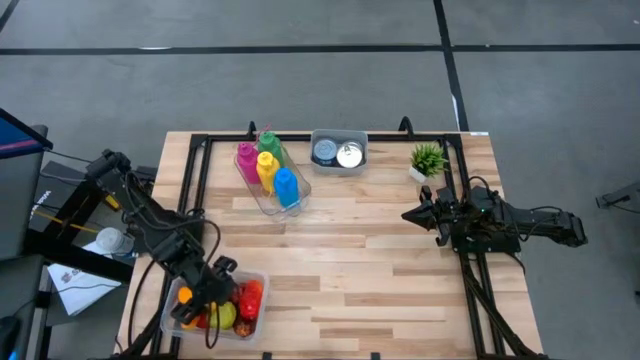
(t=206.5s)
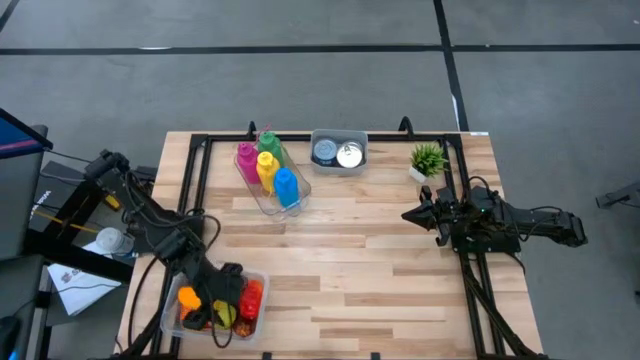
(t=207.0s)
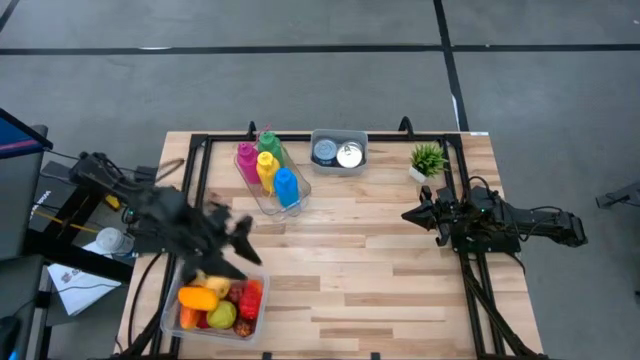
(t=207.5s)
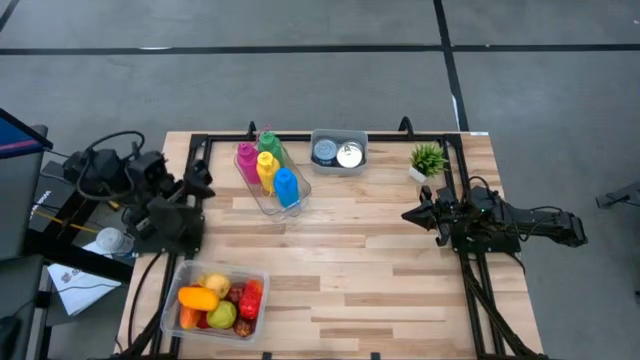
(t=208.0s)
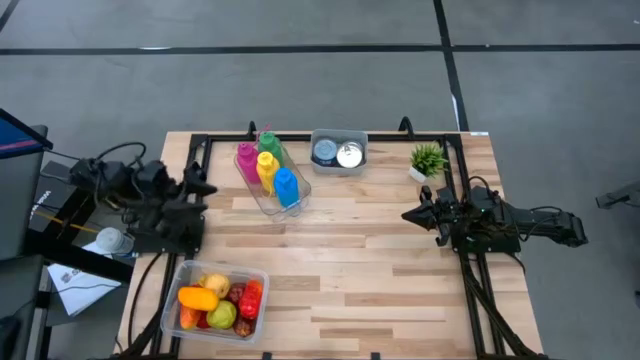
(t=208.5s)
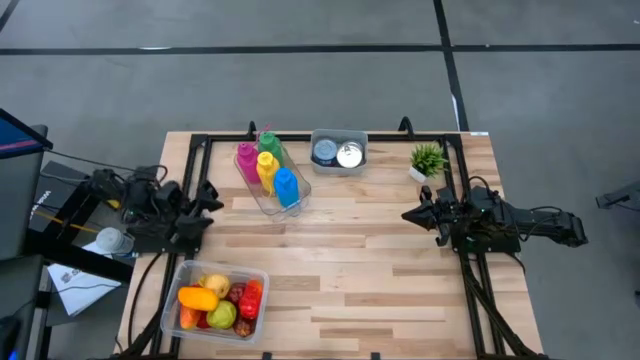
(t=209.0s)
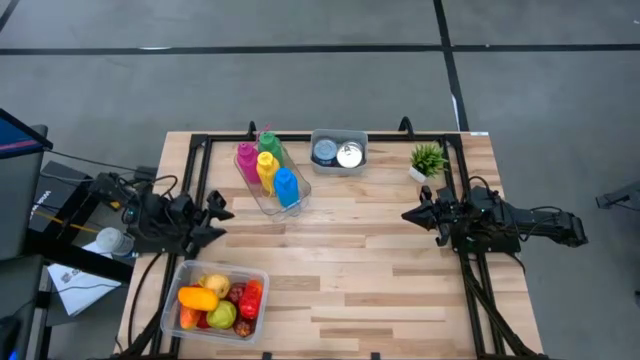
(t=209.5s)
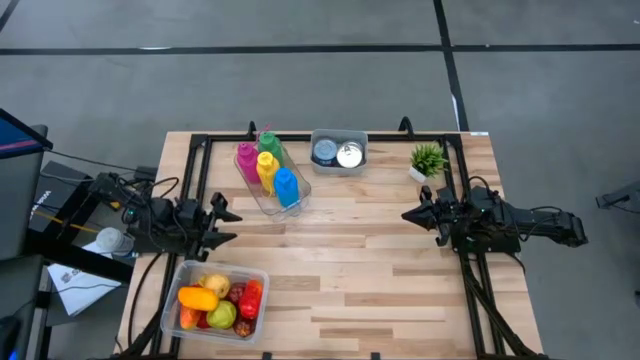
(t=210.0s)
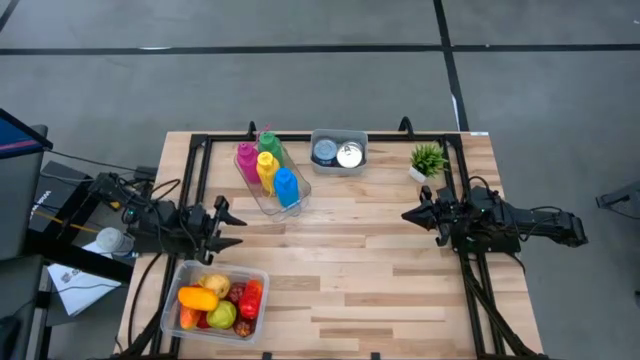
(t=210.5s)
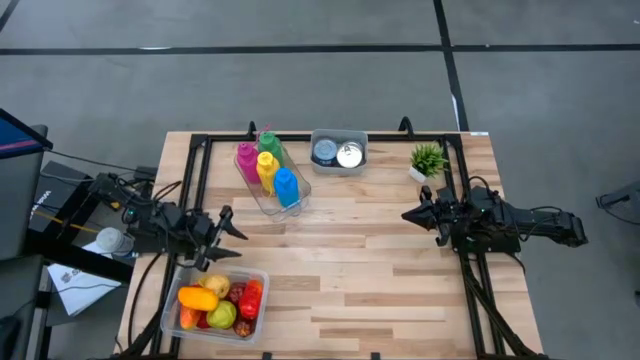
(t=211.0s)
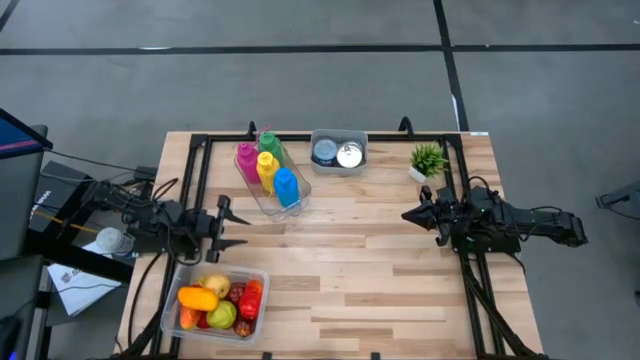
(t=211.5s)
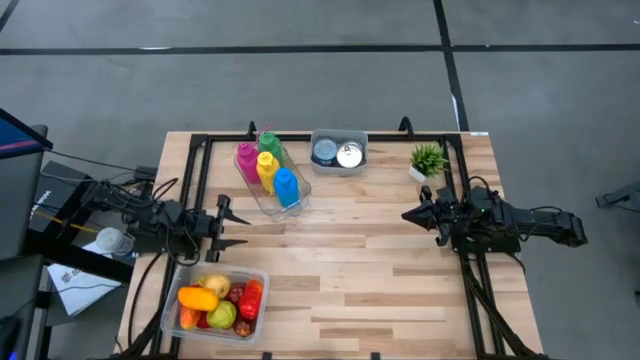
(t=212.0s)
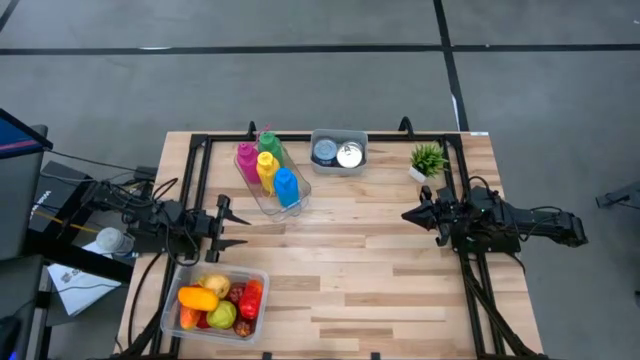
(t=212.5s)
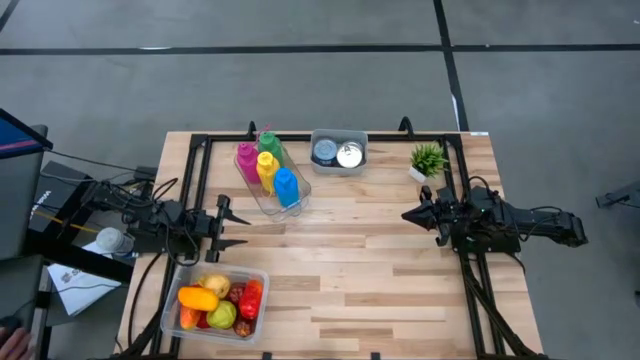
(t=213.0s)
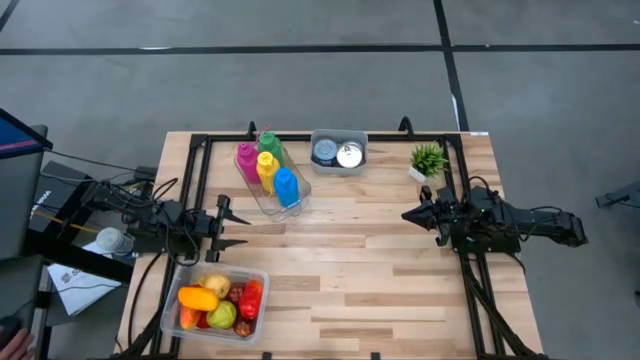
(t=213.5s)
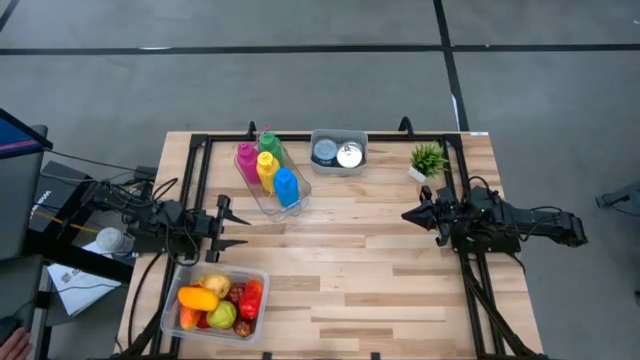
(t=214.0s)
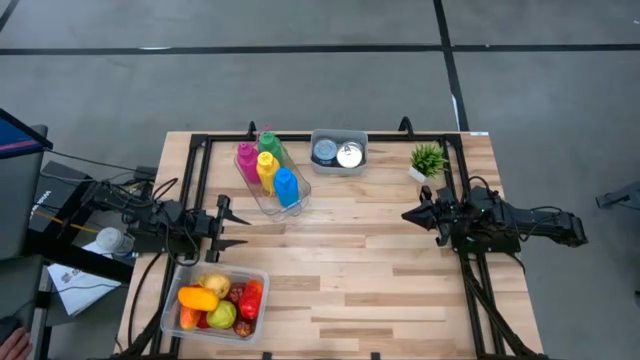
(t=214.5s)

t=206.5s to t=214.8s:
Task: Pick & Place Food Item
Return to Home Position

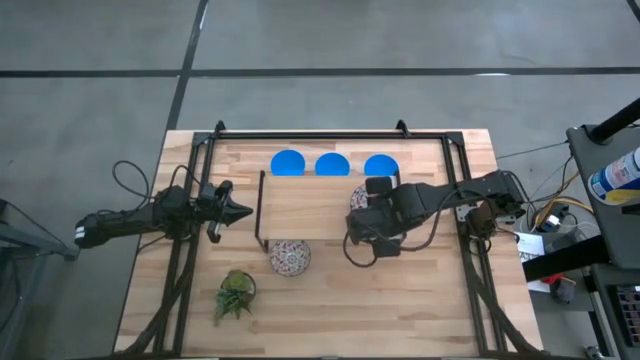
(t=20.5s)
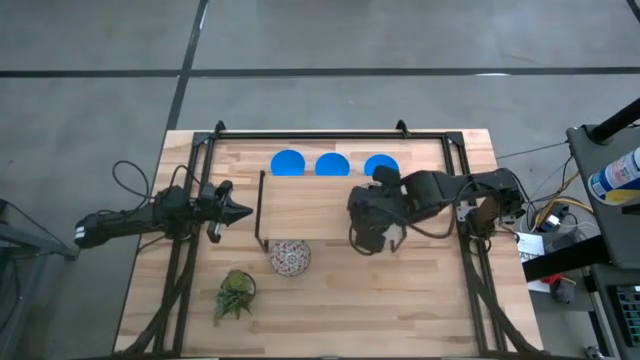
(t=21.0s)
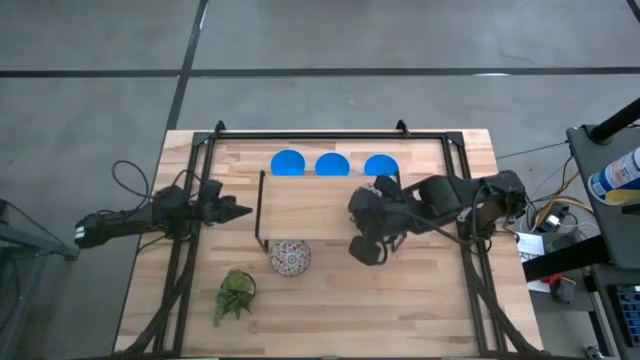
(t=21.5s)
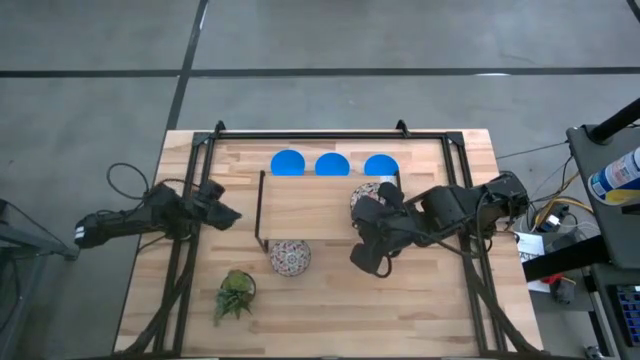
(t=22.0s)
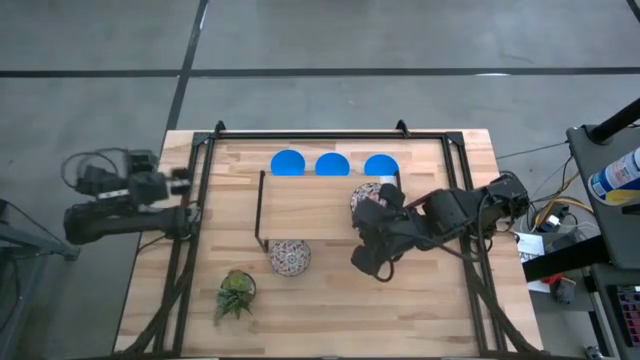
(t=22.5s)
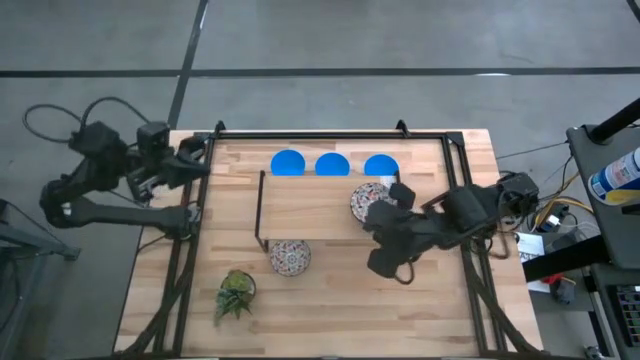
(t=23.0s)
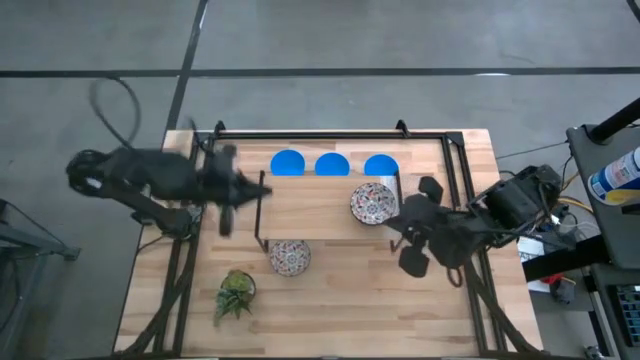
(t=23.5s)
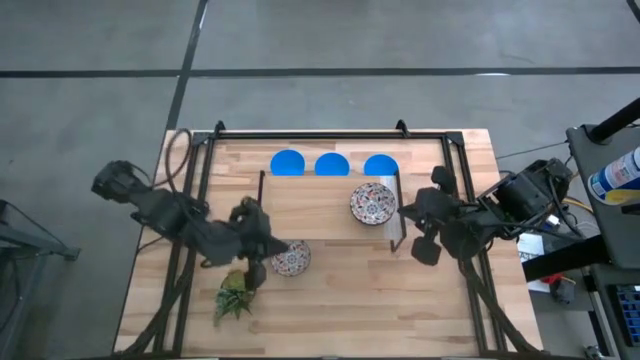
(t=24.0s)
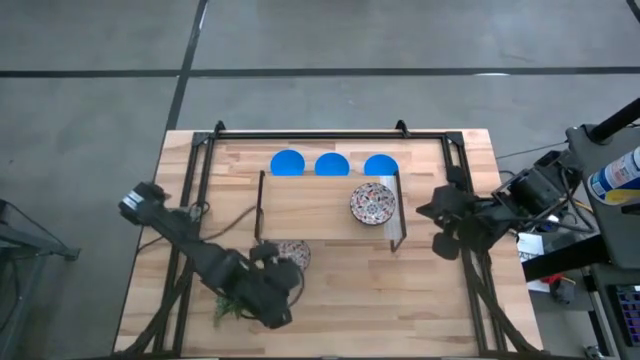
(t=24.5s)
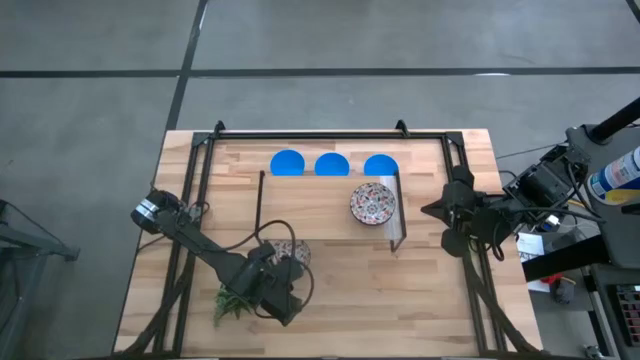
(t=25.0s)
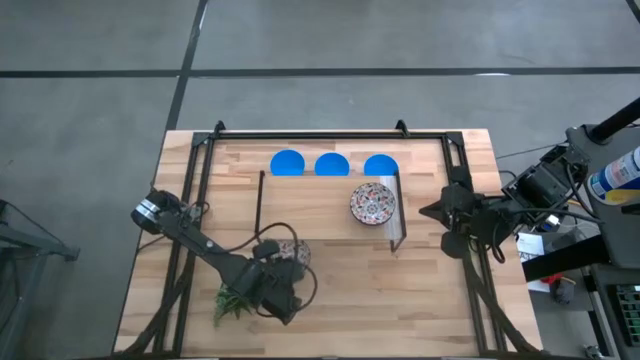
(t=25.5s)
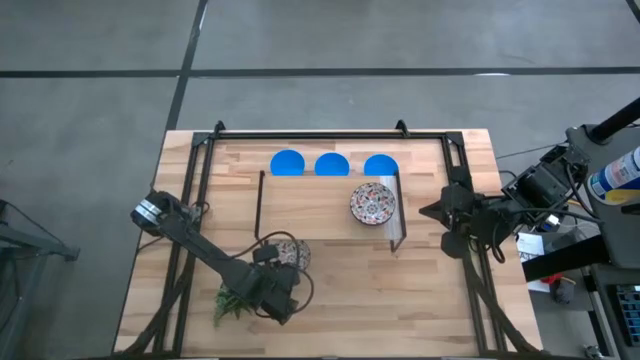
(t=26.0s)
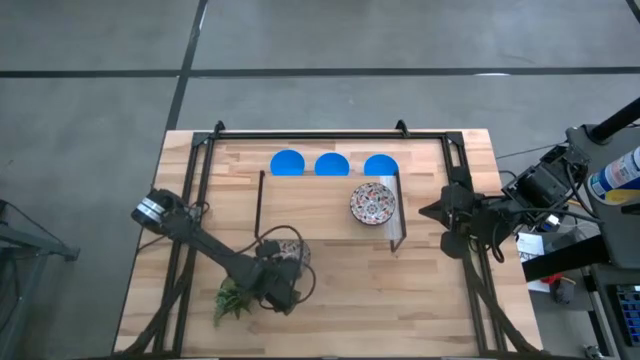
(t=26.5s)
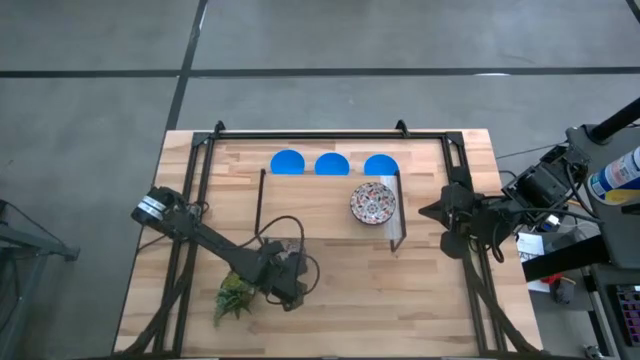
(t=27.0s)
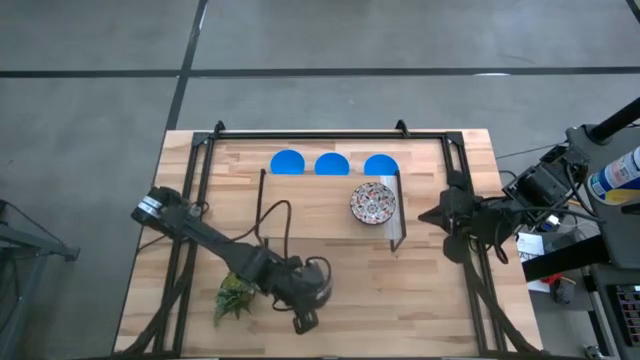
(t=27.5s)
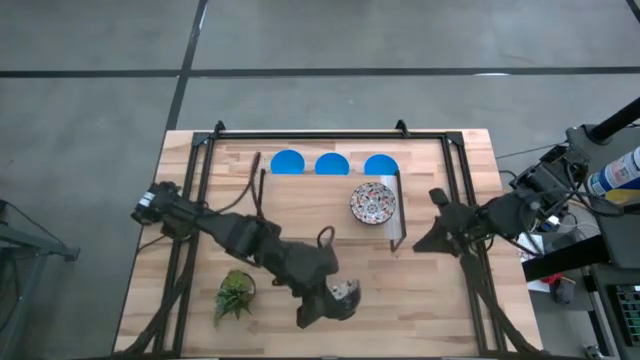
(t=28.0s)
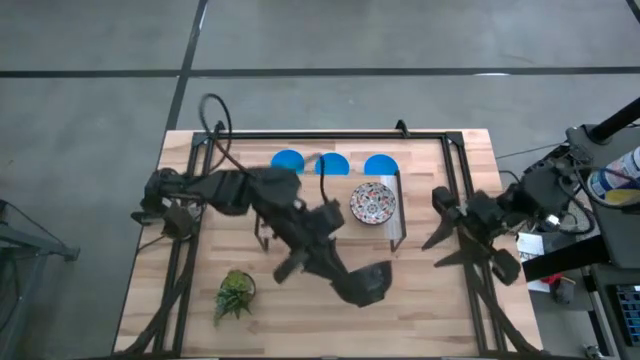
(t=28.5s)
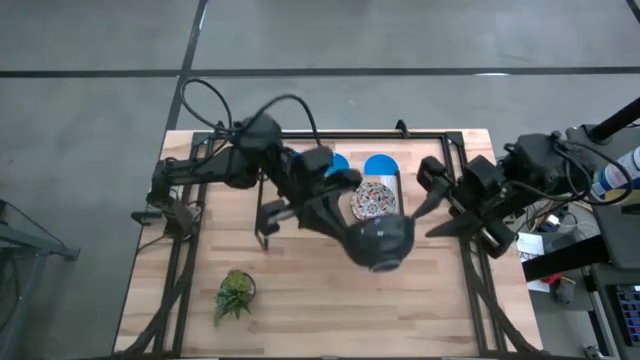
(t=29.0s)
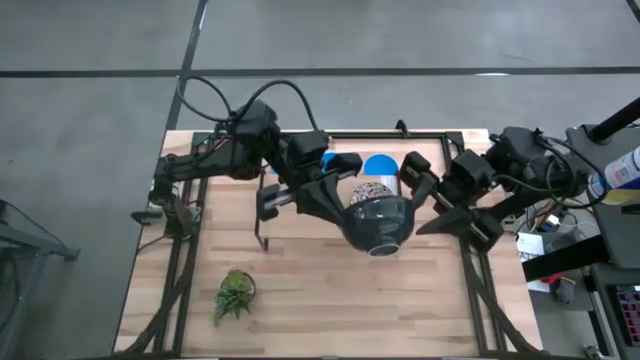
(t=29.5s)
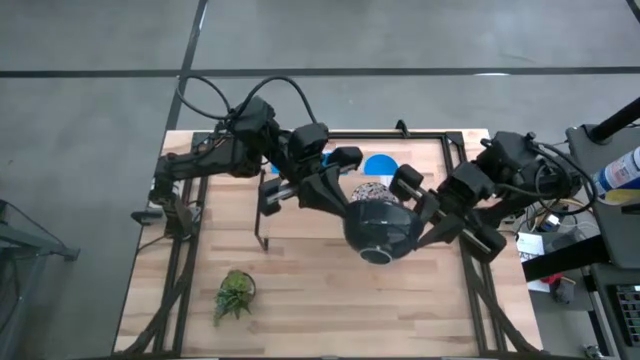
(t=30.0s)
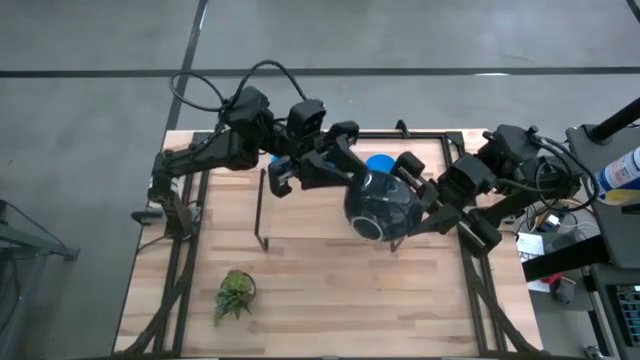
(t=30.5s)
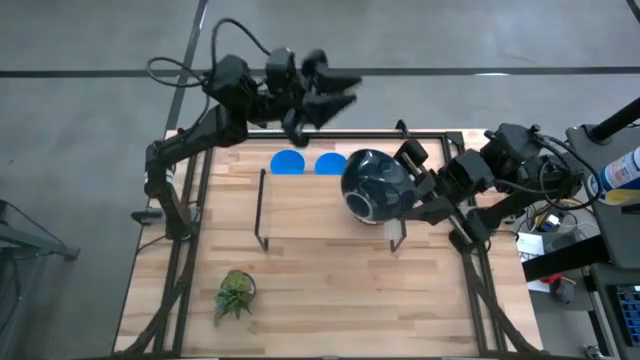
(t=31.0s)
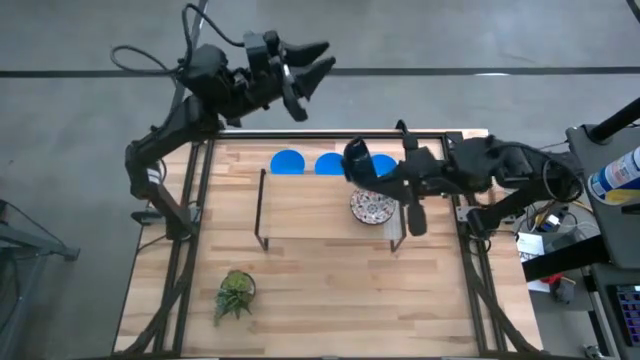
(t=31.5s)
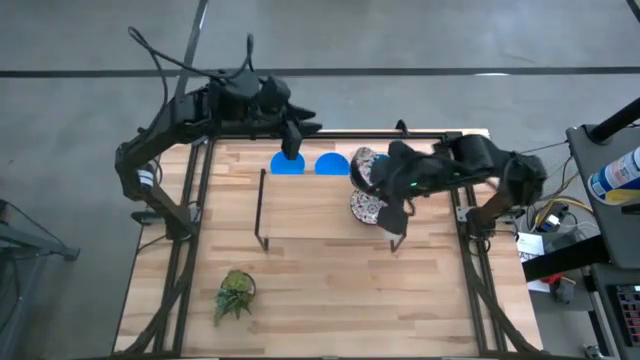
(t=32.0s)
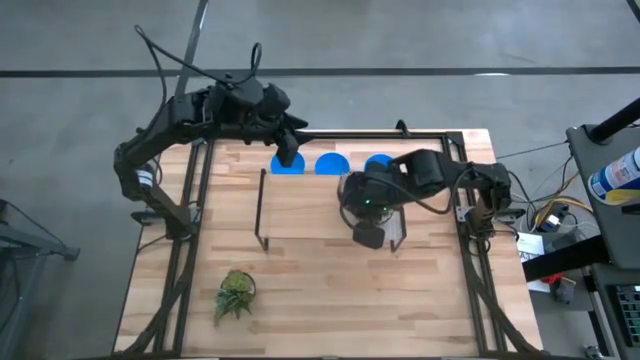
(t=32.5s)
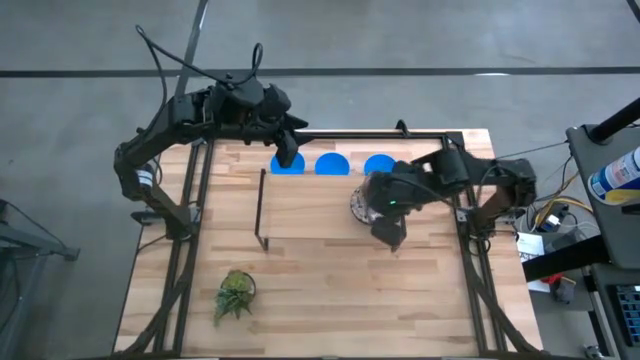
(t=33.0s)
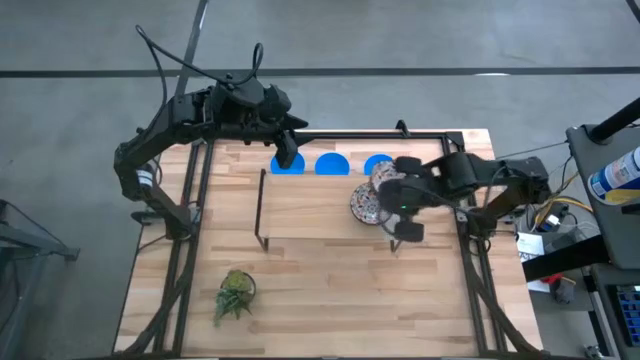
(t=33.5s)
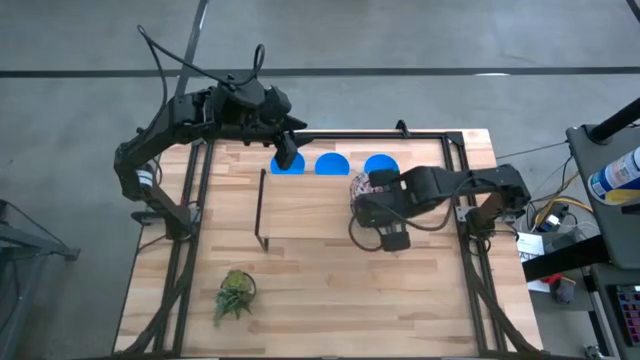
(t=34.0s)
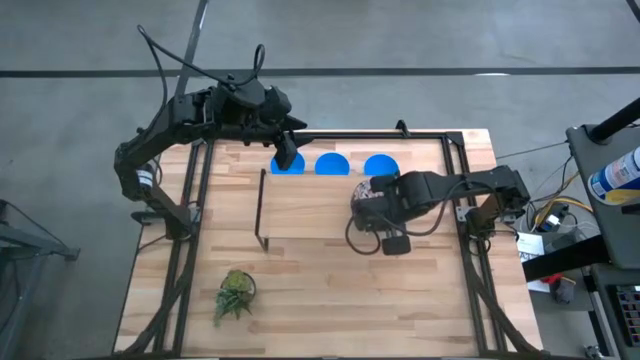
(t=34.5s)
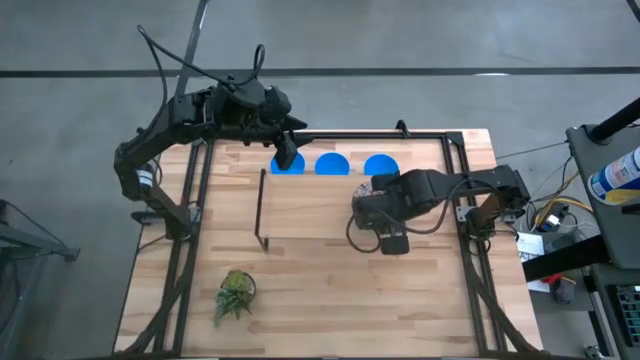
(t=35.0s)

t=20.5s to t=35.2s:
Task: Pick & Place Mini bowls
Stack the black patterned bowl on top of the black patterned bowl on the shelf
